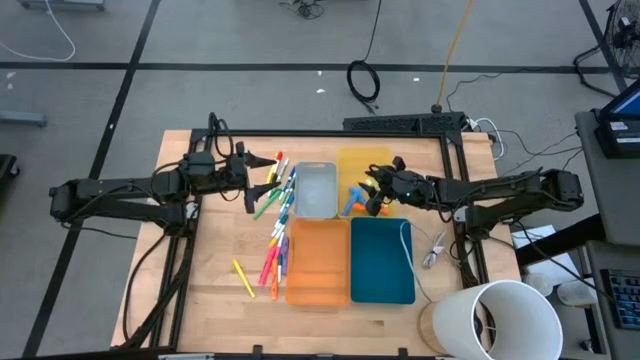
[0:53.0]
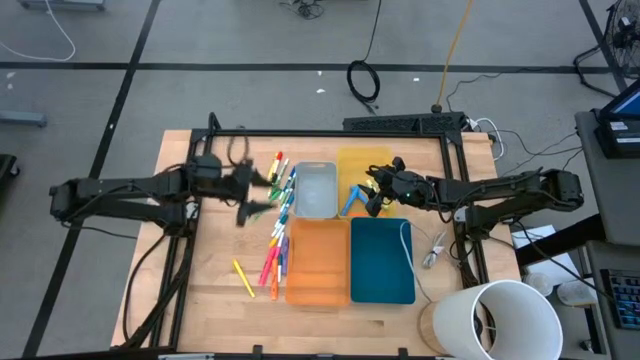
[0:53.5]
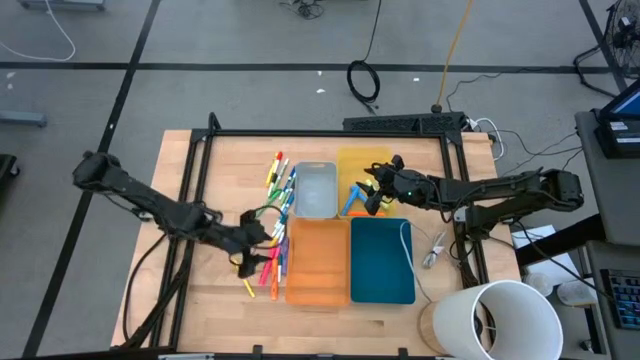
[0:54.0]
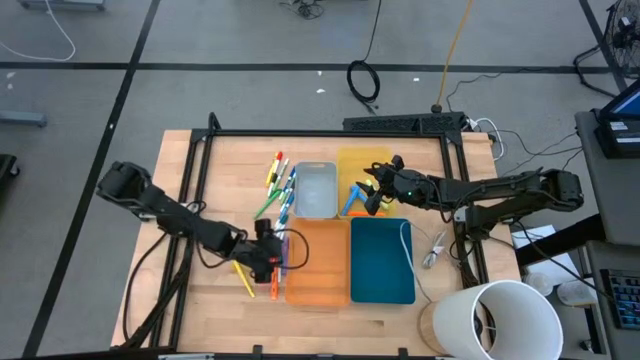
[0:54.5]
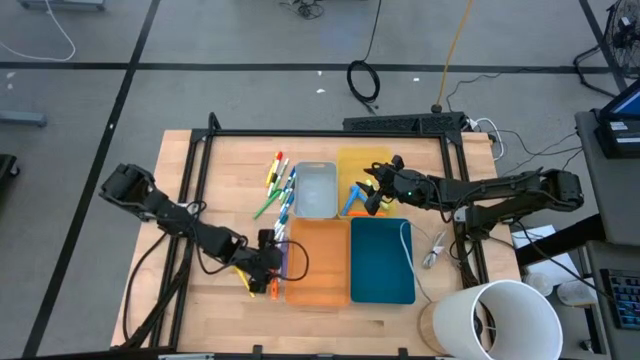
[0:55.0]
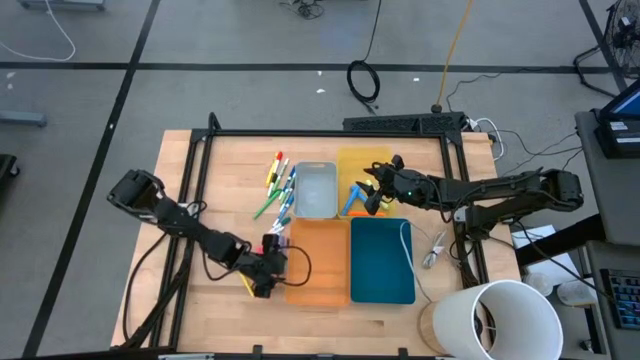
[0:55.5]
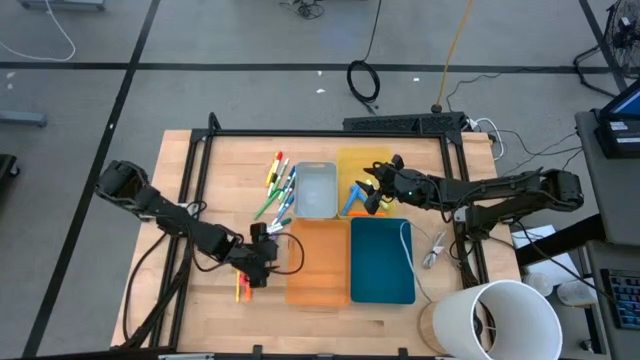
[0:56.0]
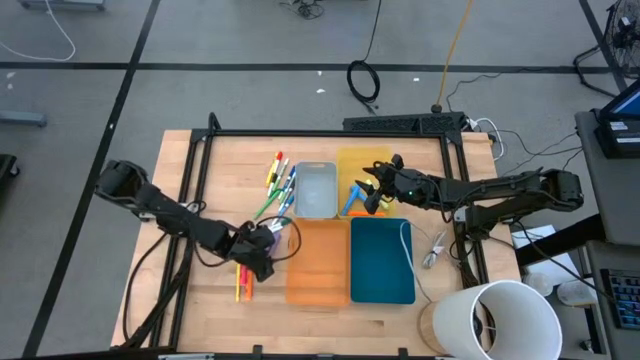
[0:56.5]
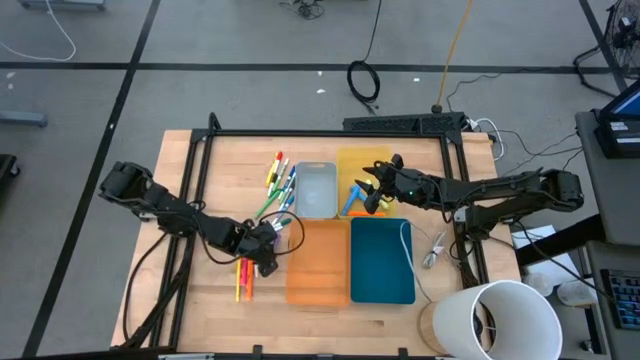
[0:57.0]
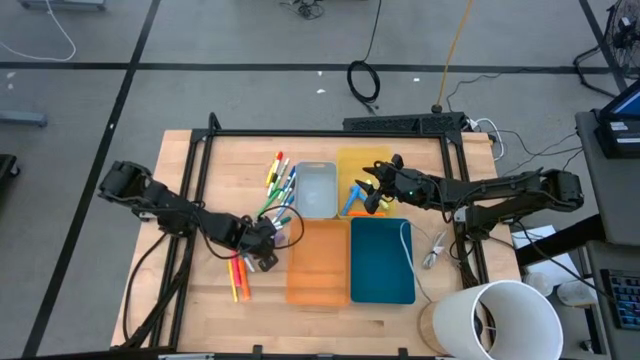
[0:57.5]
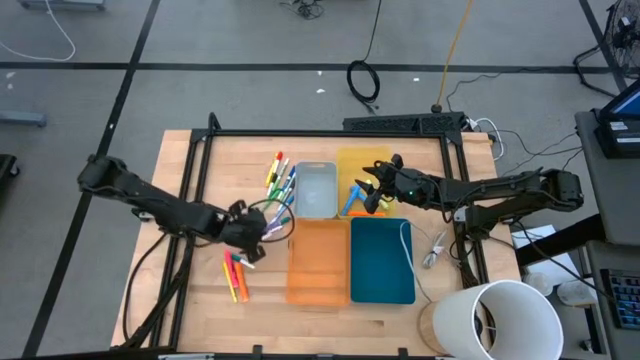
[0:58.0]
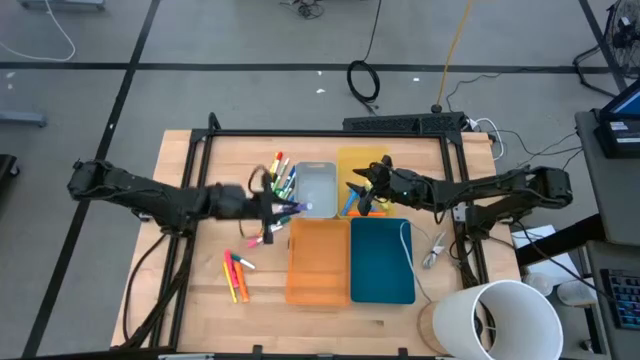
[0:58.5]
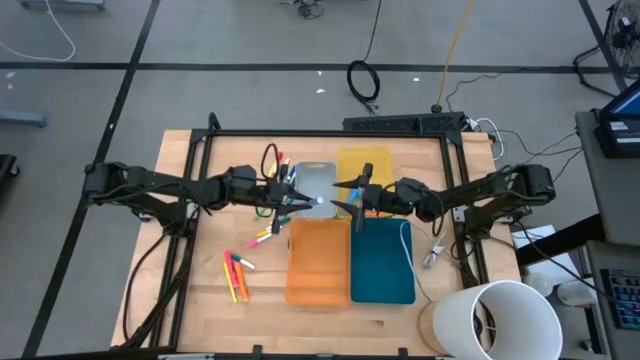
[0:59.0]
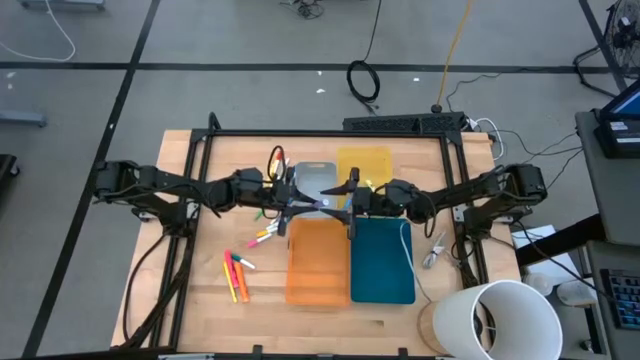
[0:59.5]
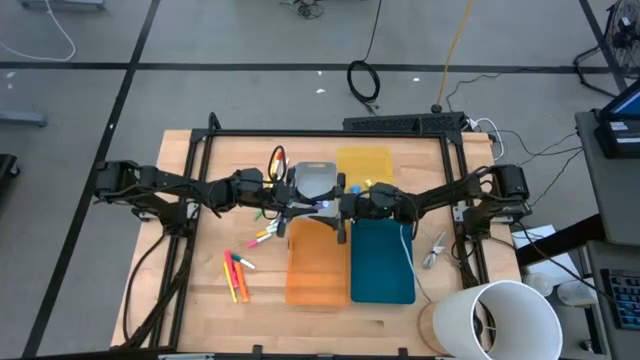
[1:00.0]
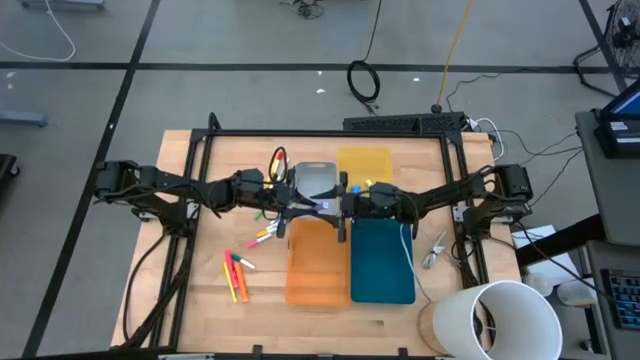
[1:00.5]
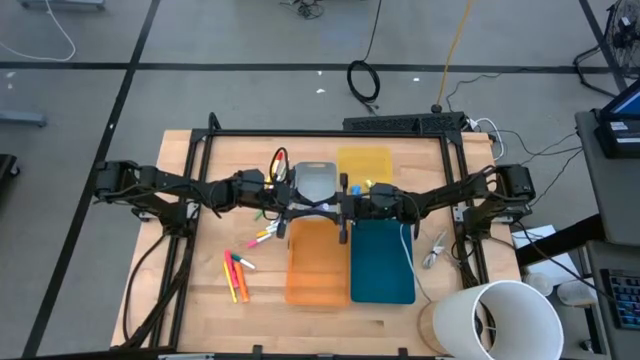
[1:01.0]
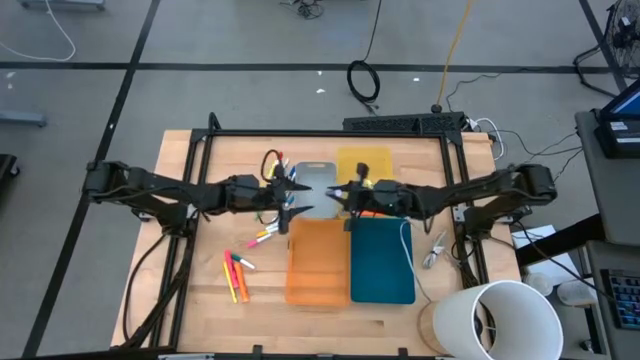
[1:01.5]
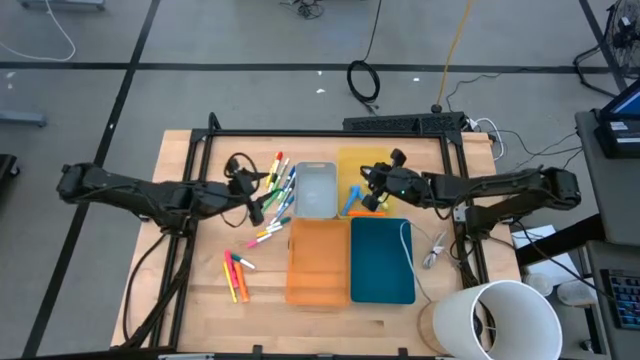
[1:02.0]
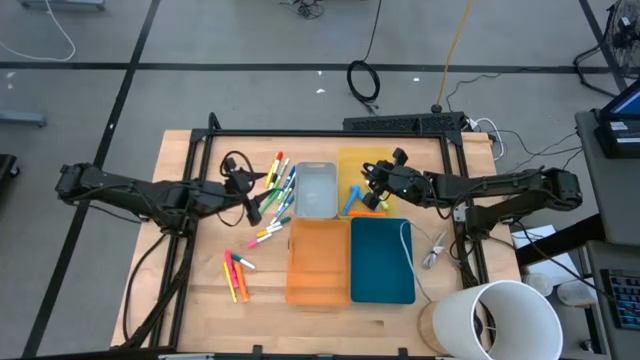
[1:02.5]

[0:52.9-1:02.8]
Task: Pick & Place Markers
Put the violet highlighter pen into the yellow bin

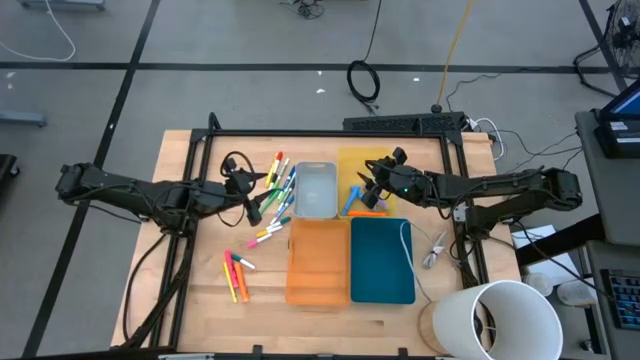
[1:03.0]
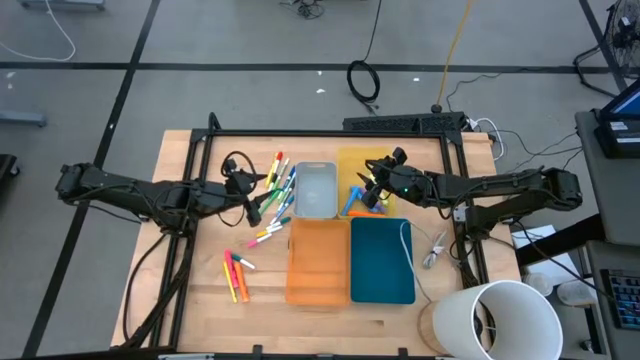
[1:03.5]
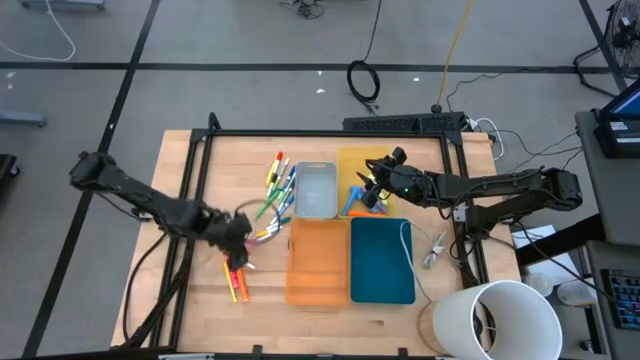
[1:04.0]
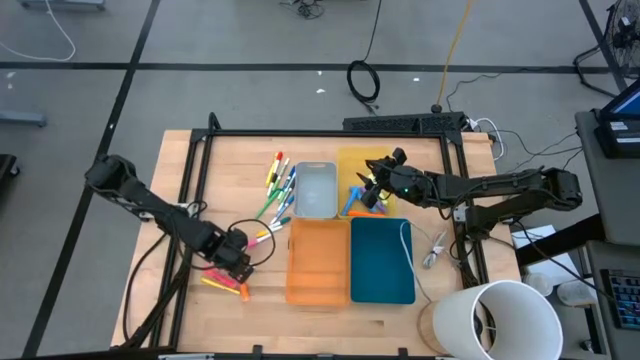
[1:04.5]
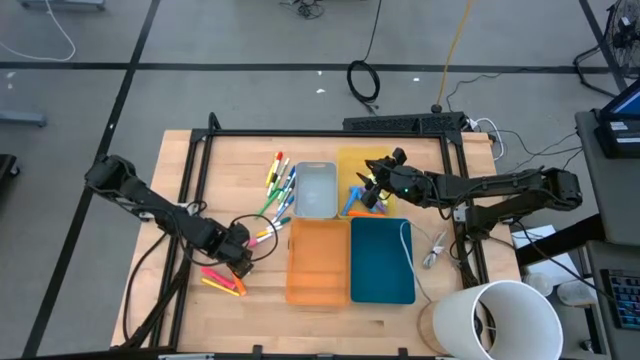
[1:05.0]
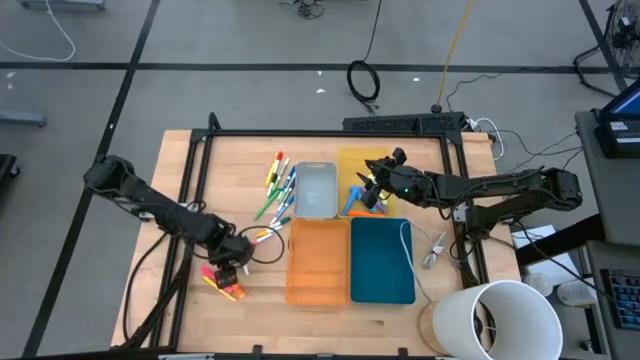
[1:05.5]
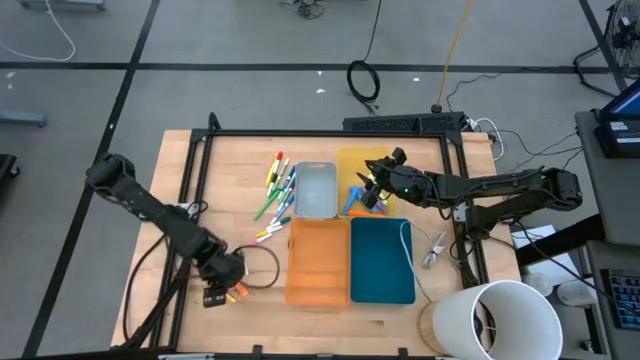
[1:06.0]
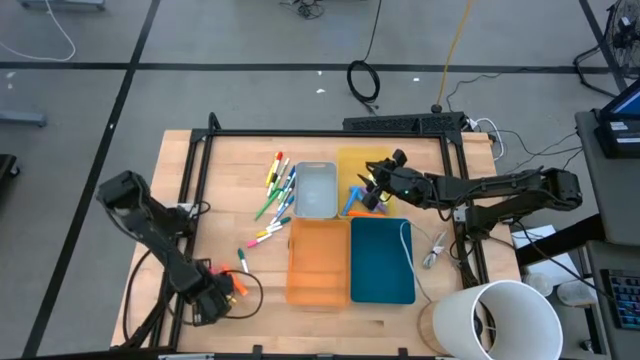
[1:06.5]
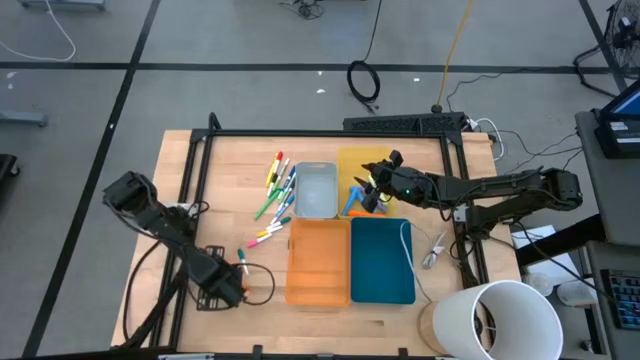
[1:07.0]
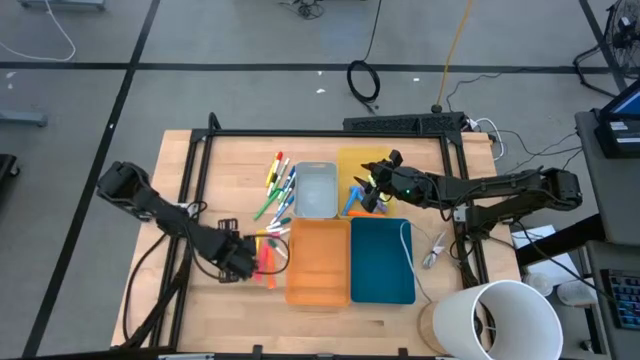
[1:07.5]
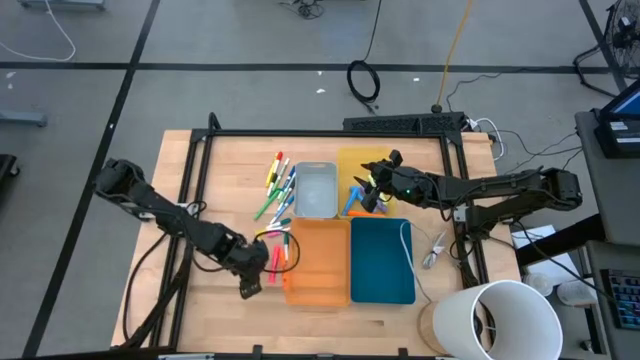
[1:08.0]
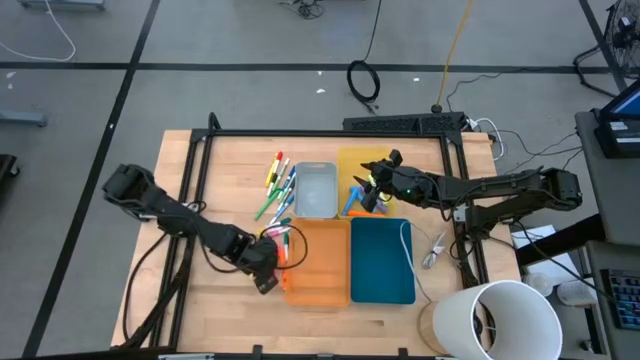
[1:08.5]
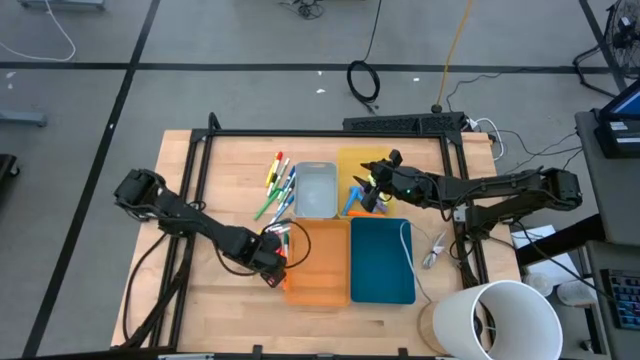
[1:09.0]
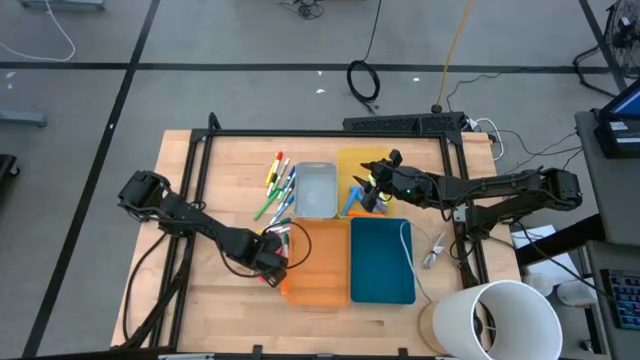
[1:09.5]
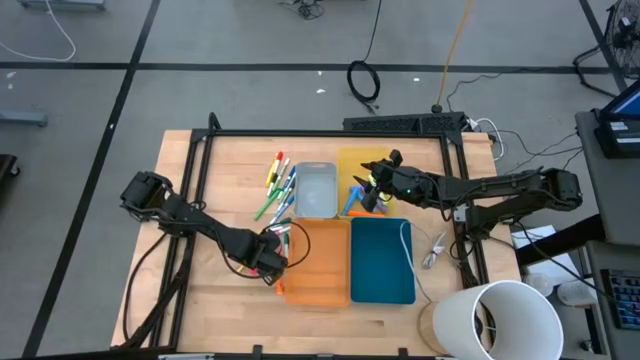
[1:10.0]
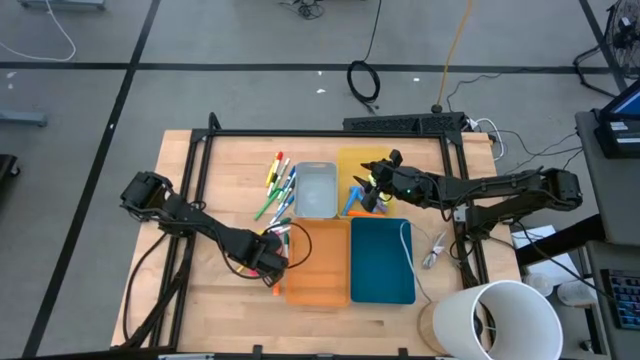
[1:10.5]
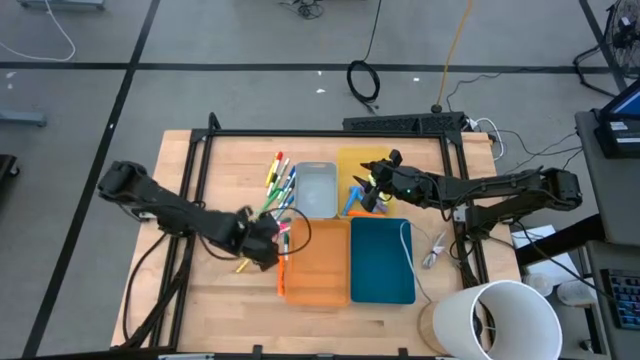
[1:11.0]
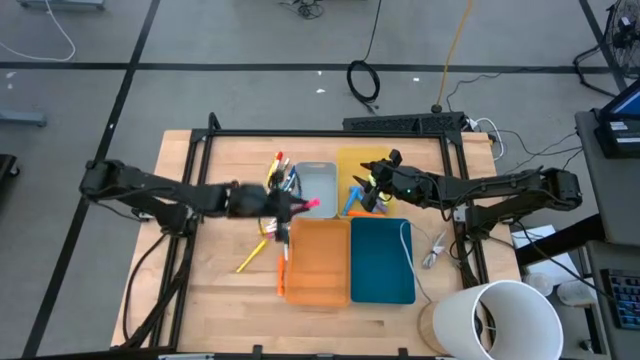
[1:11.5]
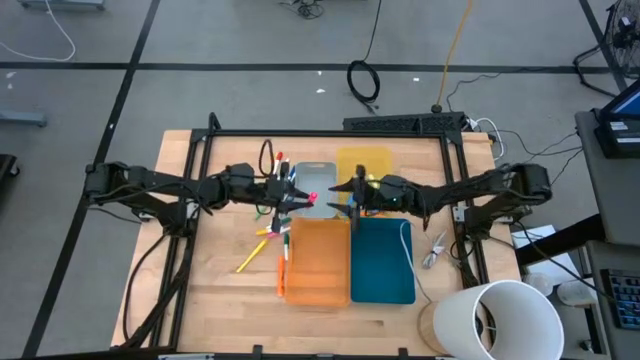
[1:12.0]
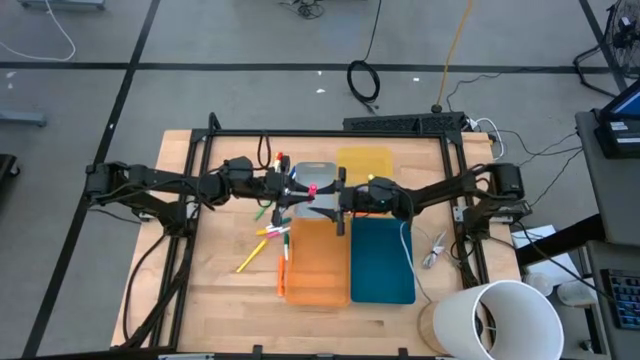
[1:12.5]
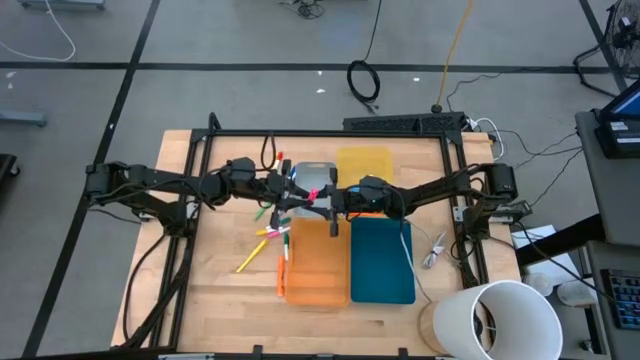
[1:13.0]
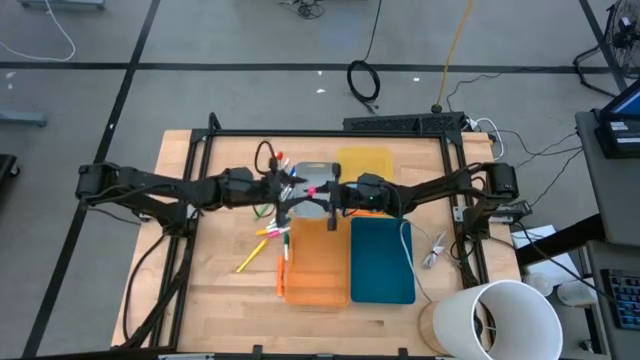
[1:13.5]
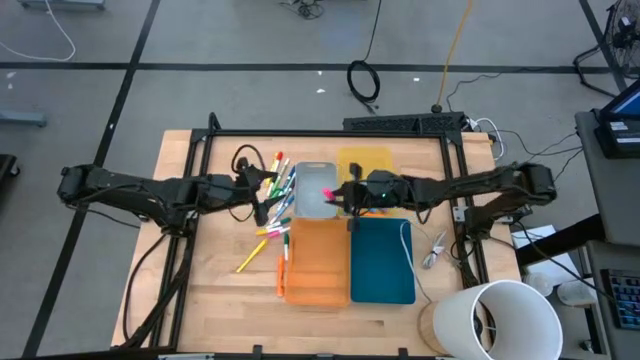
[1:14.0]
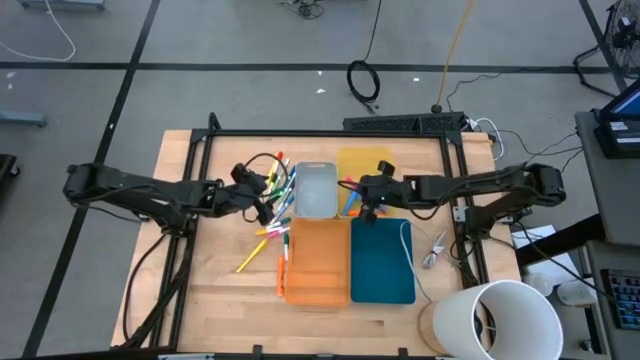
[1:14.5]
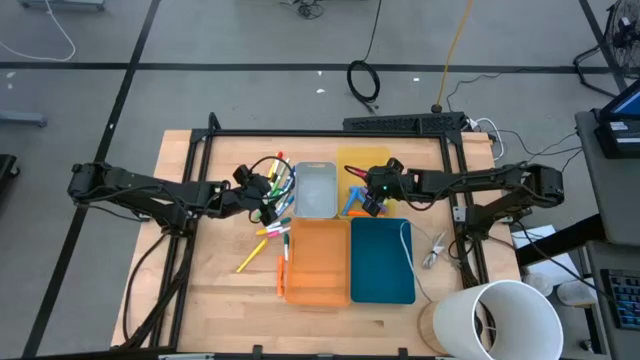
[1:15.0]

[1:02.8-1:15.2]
Put the pink highlighter pen into the yellow bin

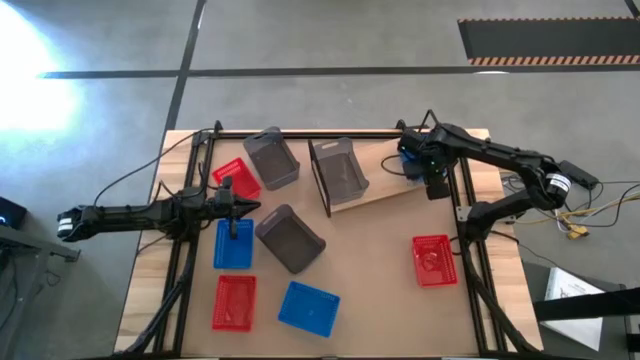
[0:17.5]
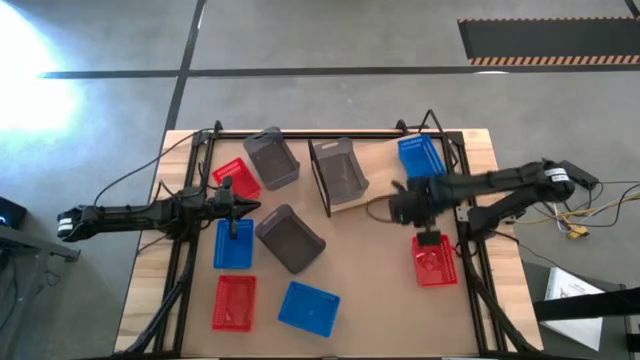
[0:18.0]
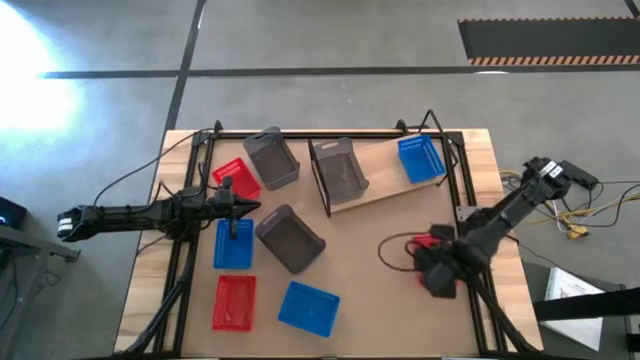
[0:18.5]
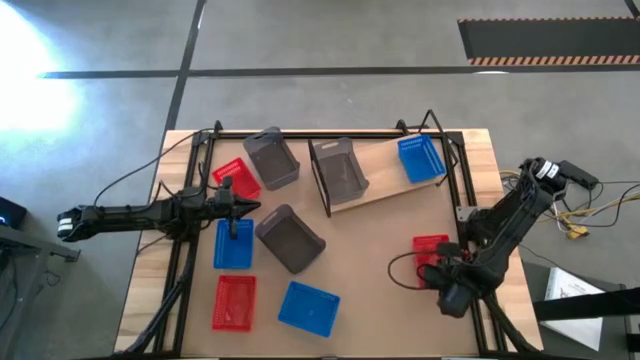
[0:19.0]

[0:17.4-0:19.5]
Task: Stack baskets on shelf by color
Put the bottom right red bin on the shelf
